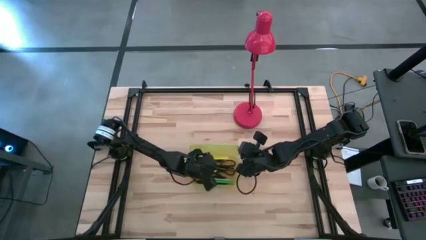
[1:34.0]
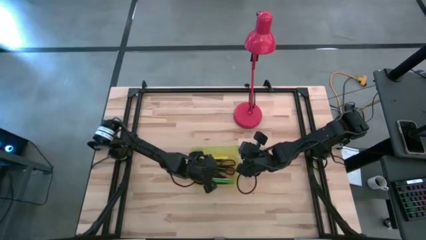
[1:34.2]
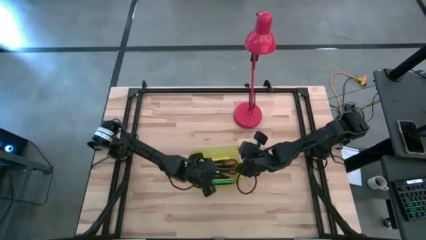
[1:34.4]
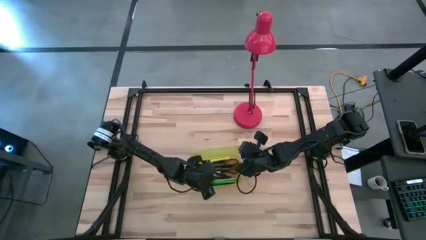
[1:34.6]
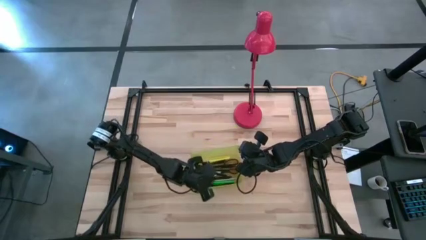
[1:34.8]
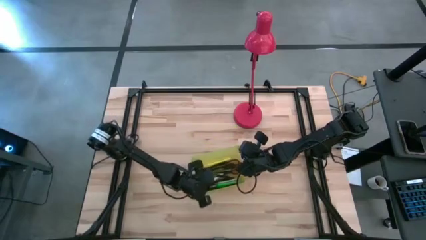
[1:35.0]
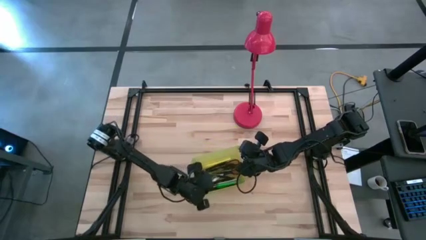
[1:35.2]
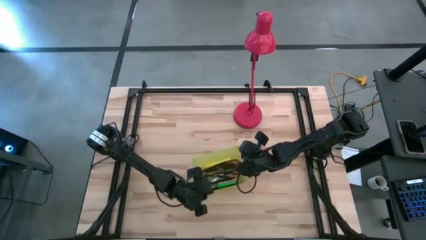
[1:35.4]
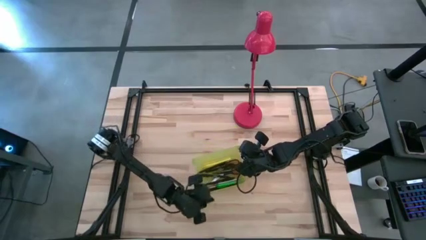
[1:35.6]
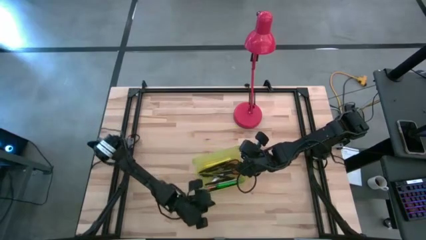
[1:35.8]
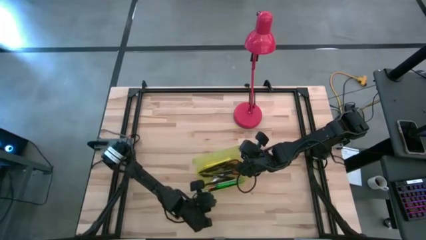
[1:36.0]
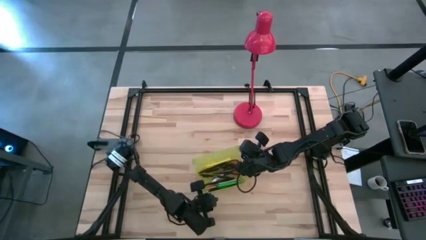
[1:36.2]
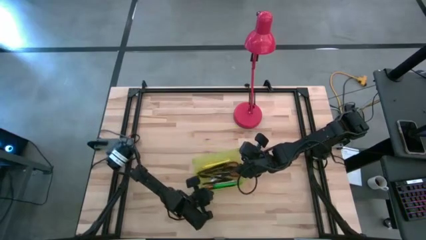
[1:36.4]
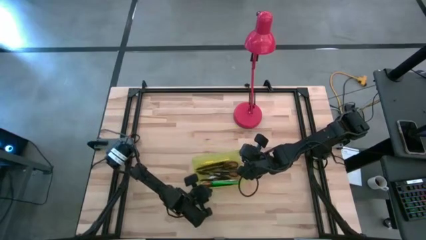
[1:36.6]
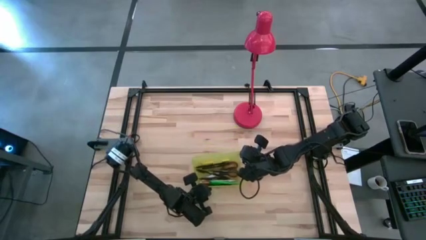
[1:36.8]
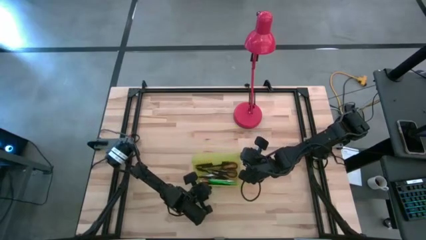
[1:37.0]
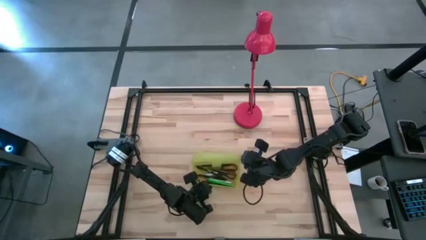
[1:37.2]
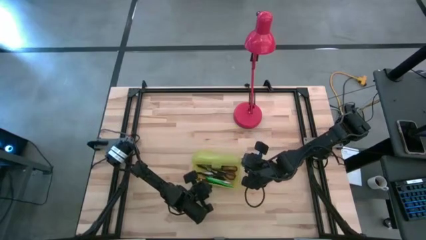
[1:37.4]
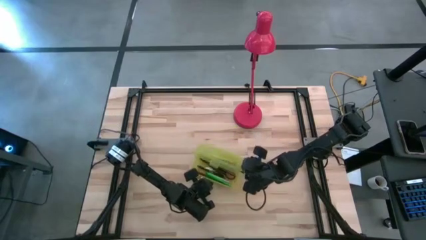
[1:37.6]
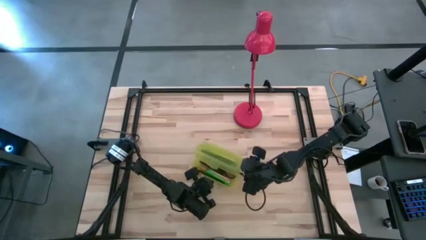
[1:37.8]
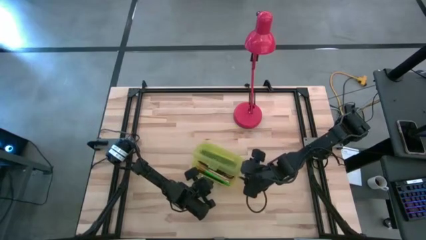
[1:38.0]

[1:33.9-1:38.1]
Task: Pick & place school supplies into a supply box
Close the yellow supply box

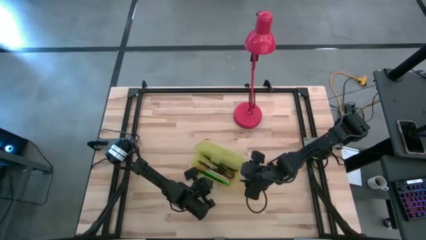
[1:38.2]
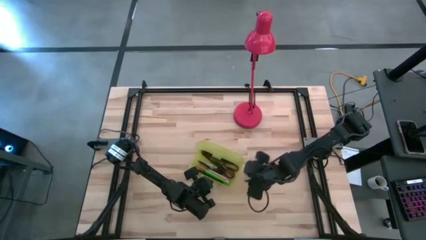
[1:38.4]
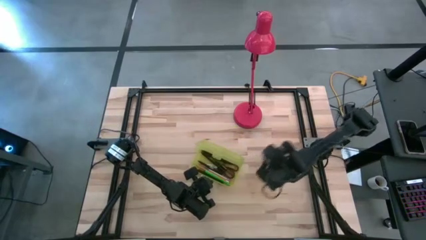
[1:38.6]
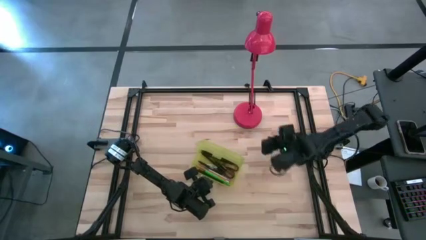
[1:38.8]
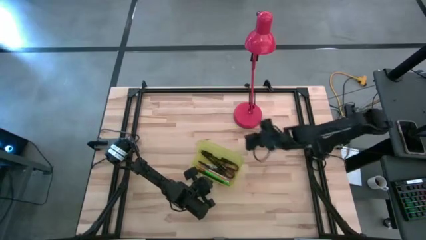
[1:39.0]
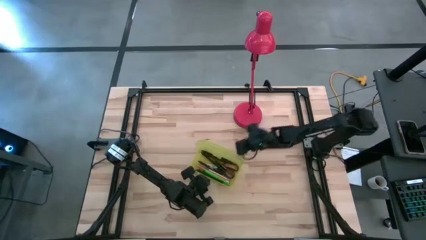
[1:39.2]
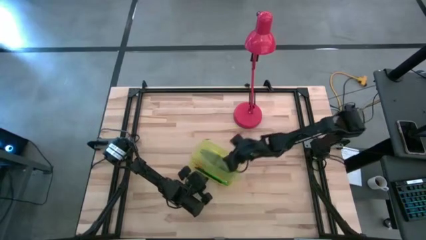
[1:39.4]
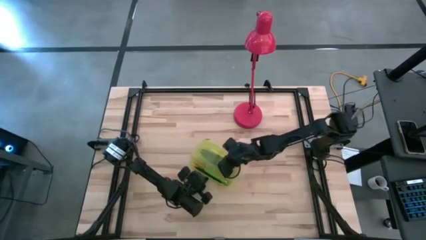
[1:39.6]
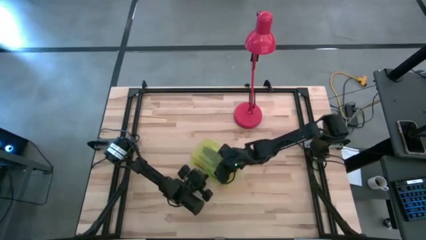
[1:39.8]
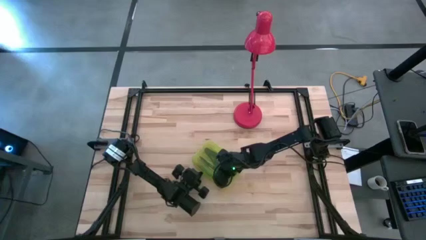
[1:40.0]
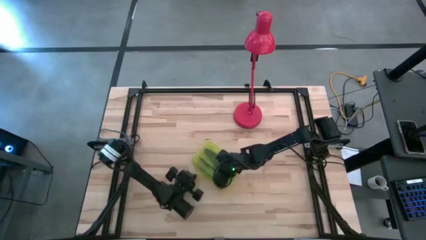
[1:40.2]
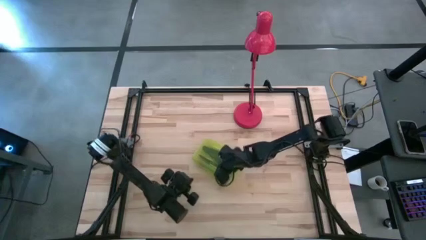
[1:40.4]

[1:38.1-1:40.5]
Close the yellow supply box

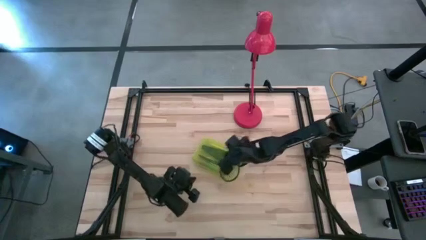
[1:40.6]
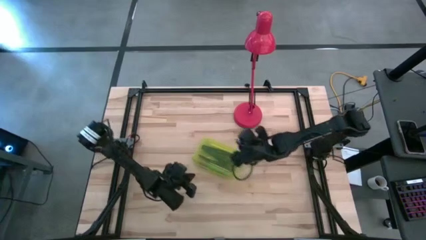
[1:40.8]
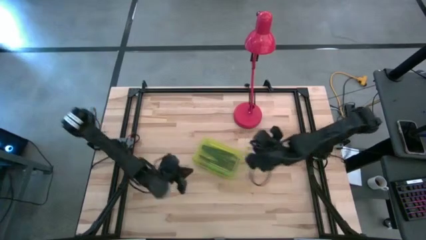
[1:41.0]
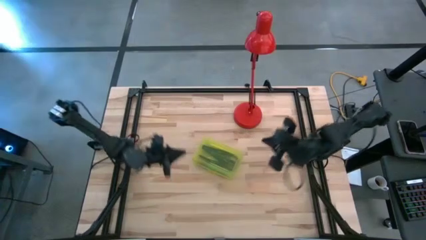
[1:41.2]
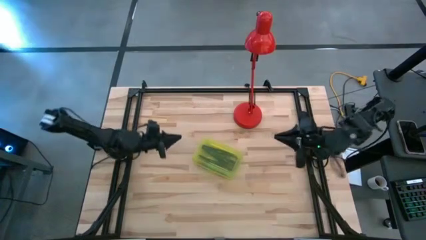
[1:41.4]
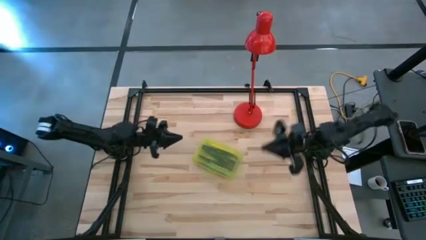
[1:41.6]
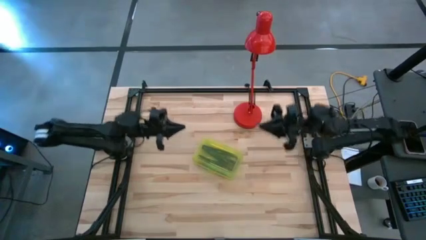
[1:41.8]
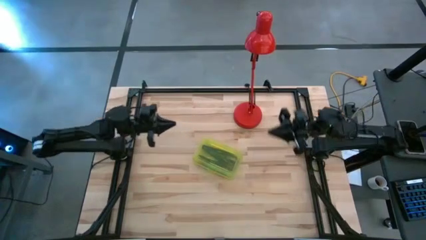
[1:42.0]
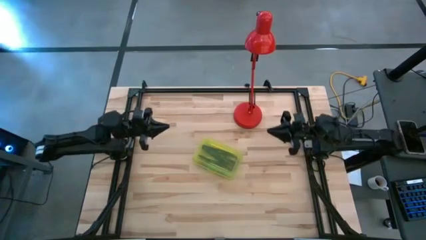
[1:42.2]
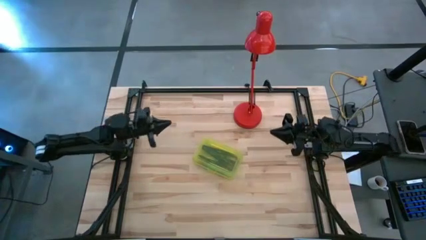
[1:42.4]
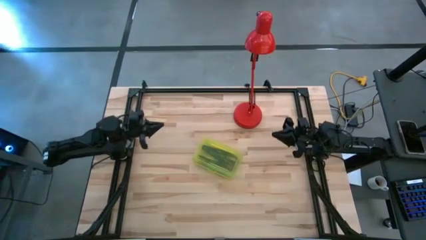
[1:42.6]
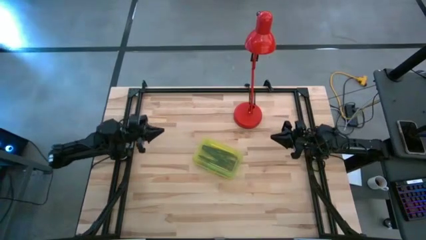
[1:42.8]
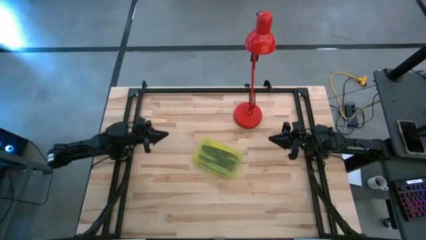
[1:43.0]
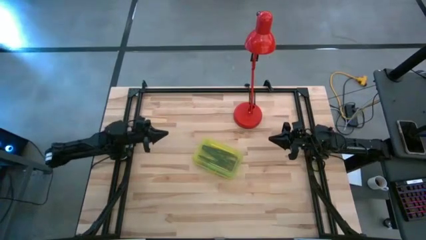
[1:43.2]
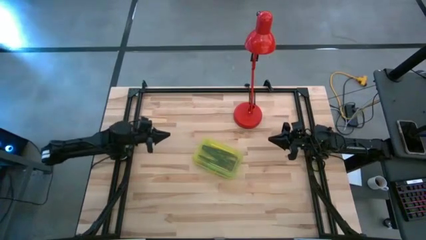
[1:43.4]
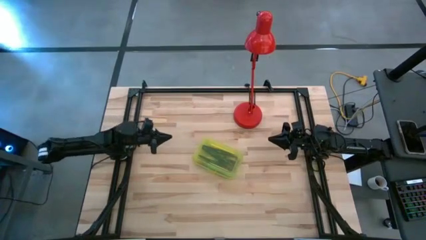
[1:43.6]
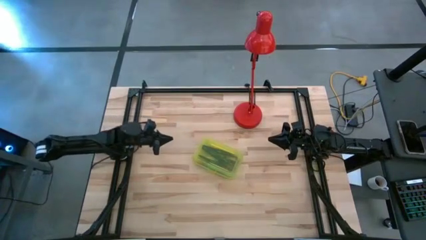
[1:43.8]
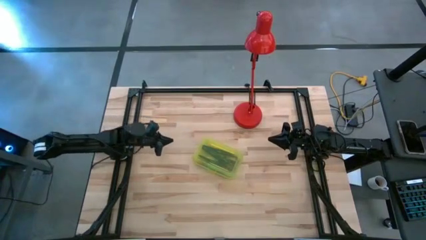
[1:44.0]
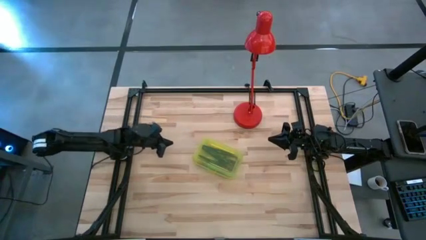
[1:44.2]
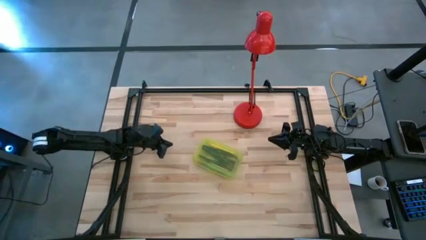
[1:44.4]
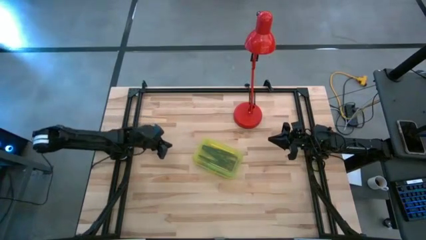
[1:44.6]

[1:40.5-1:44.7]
Return to Home Position

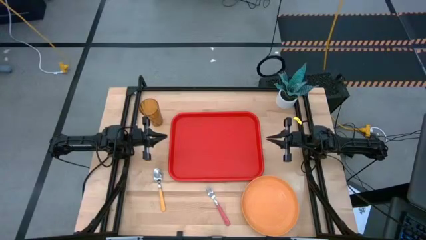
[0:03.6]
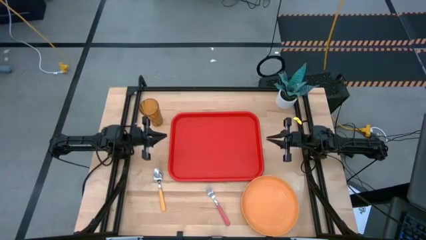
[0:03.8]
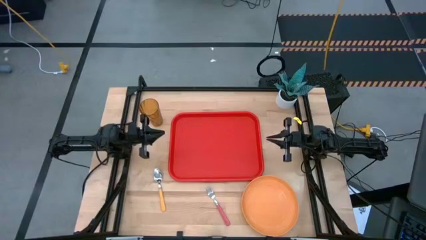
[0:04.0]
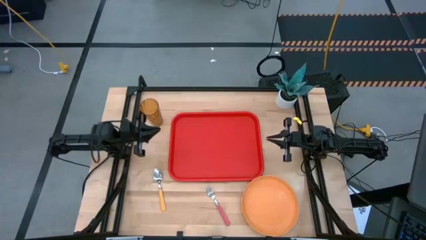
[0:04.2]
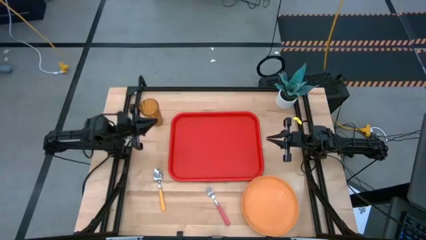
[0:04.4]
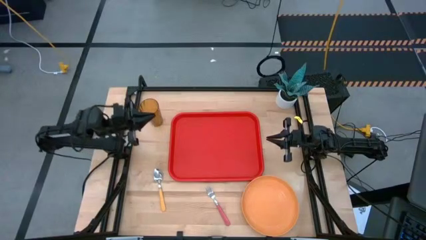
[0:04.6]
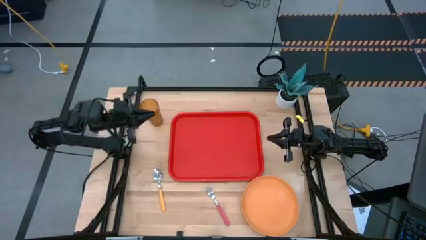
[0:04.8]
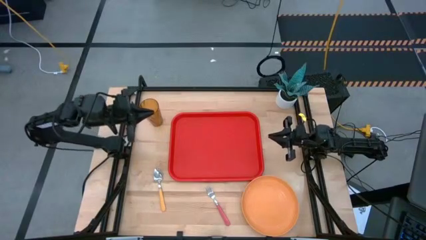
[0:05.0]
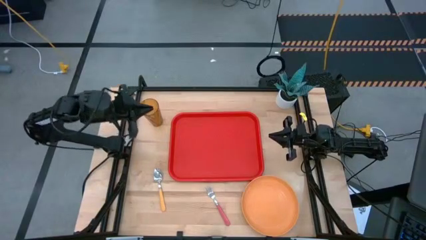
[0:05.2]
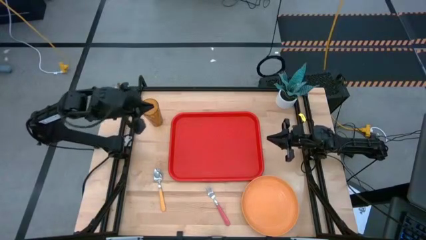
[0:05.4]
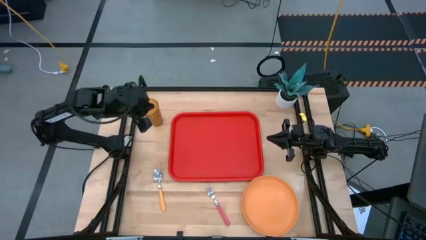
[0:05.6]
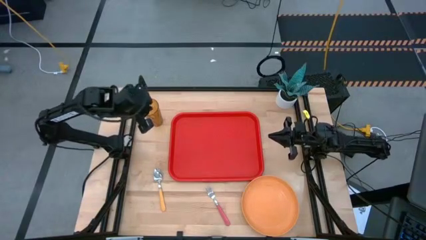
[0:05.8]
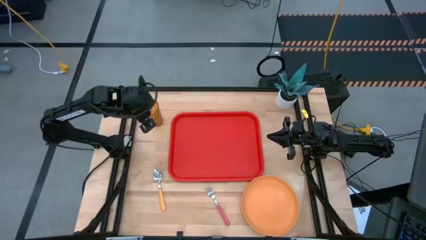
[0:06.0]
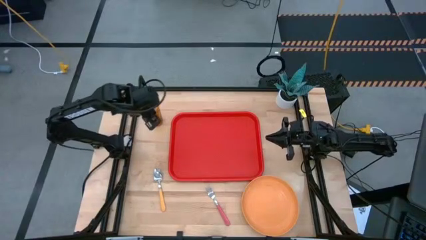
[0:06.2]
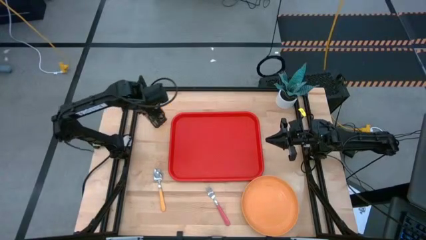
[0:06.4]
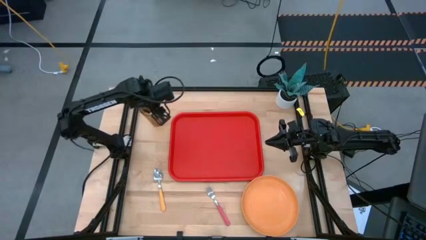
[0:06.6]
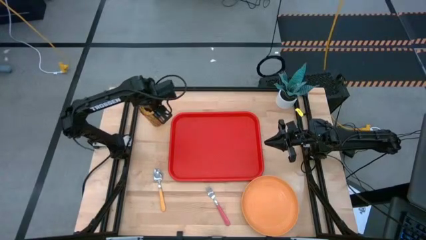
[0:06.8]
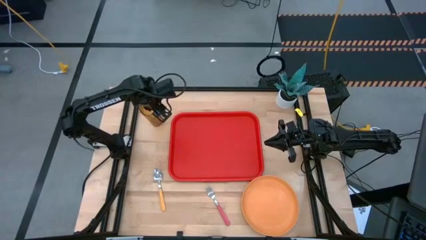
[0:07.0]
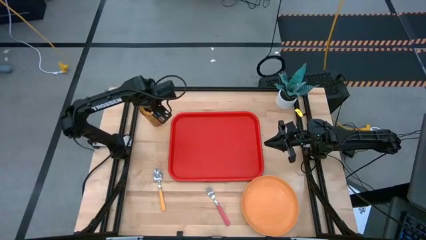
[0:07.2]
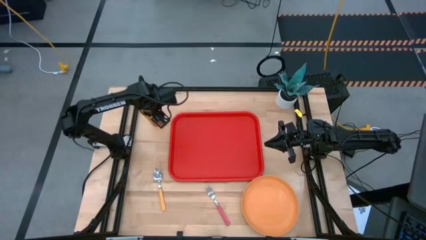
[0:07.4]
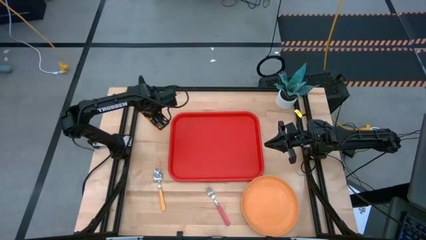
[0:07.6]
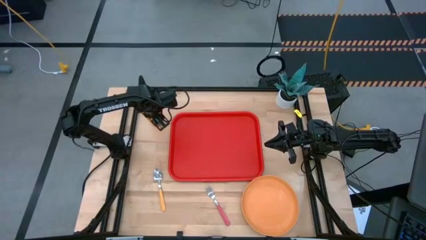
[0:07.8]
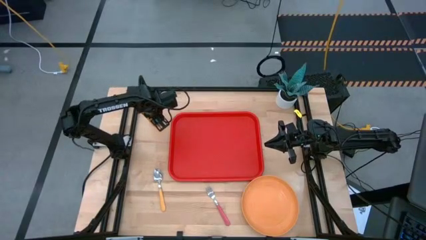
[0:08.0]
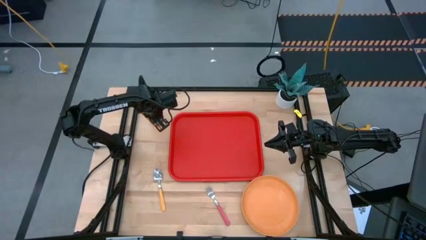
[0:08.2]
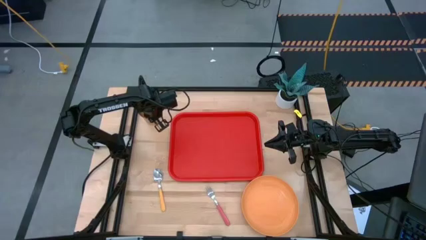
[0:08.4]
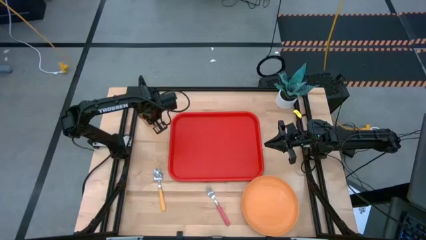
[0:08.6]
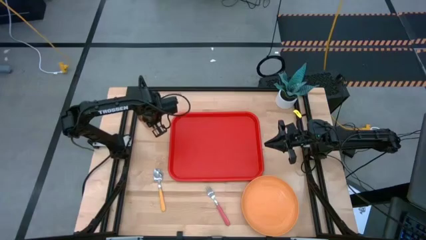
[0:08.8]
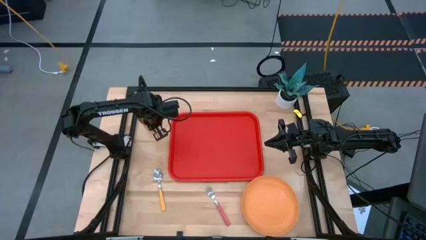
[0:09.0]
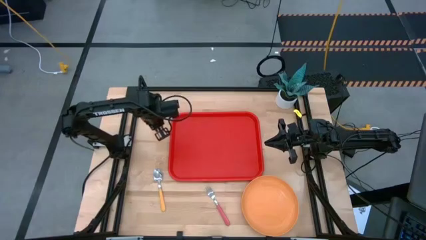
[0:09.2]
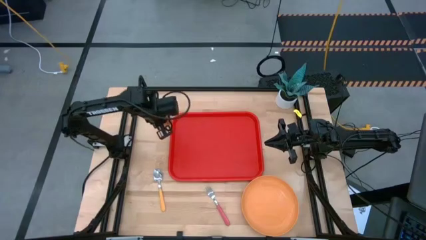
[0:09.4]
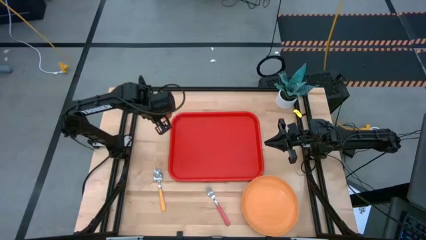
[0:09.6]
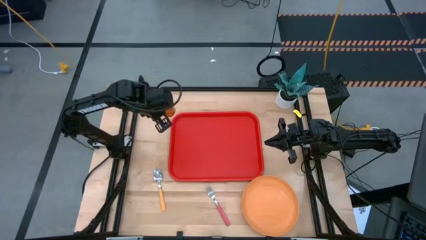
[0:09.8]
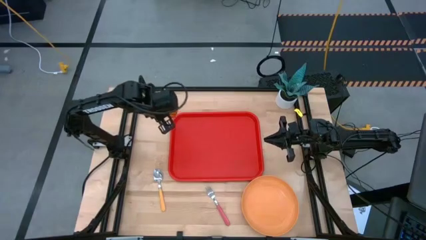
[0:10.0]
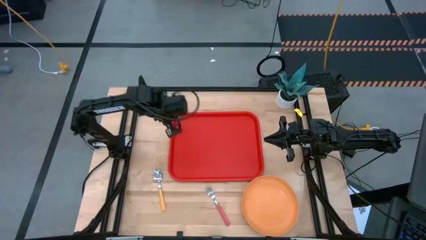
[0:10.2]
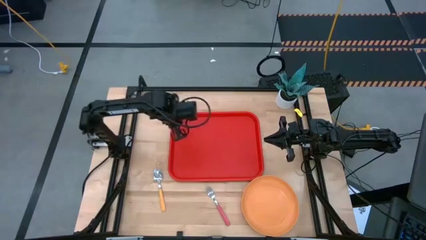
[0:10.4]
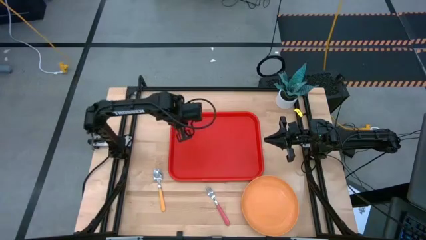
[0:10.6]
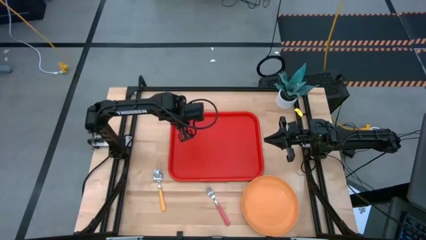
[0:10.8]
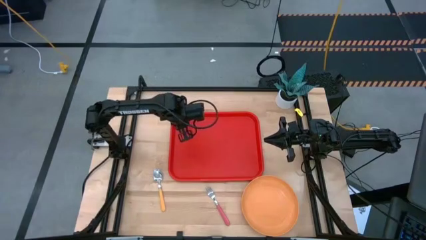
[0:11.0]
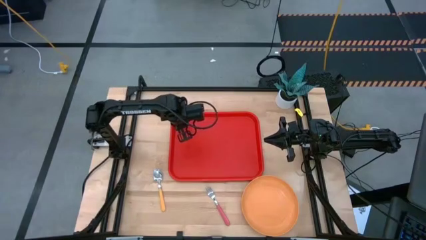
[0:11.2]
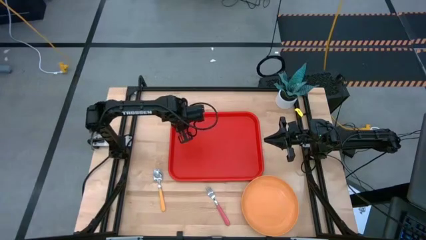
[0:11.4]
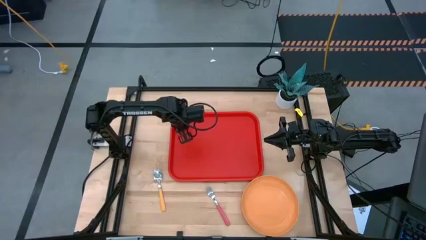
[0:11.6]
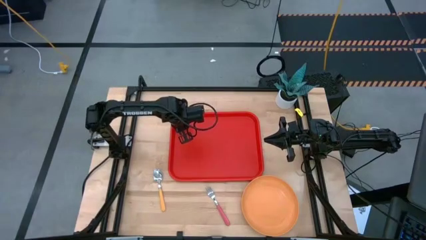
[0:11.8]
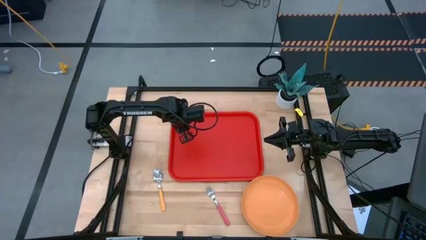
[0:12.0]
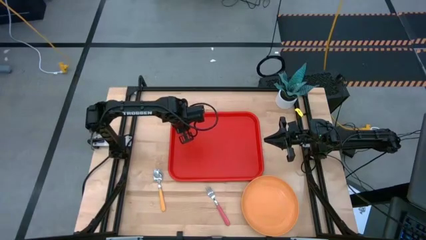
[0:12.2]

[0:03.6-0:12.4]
Task: Pick and place plate/cup/fork/spoon on tray
Put the brown cup to the top left of the red tray
